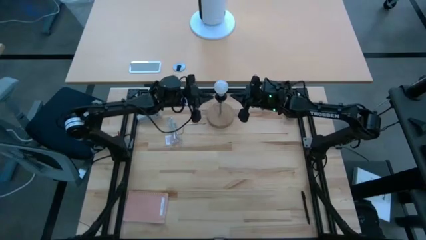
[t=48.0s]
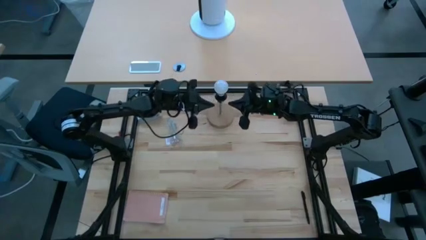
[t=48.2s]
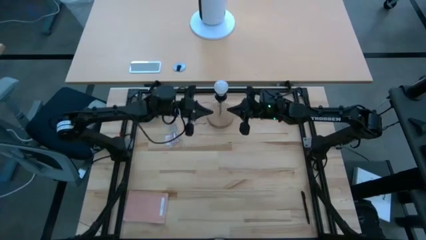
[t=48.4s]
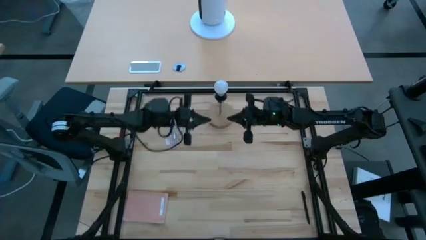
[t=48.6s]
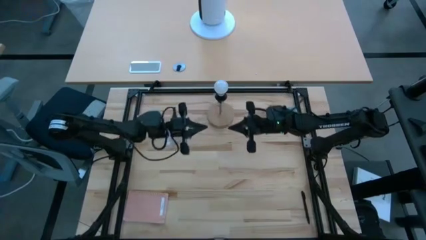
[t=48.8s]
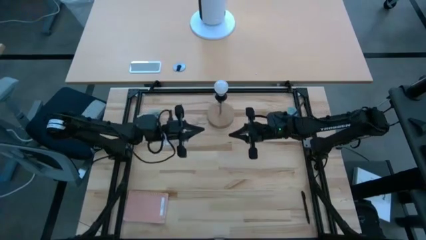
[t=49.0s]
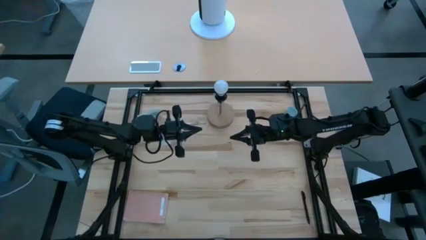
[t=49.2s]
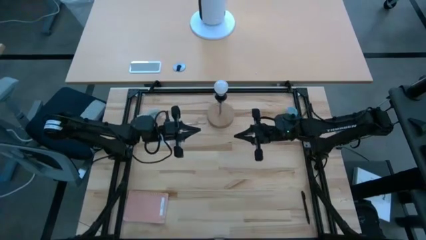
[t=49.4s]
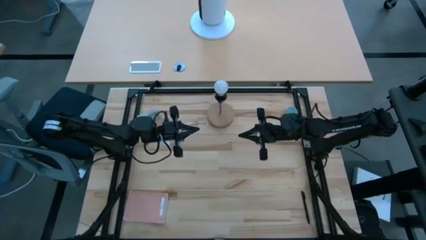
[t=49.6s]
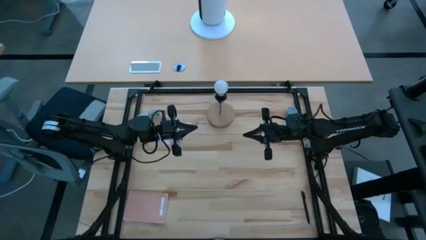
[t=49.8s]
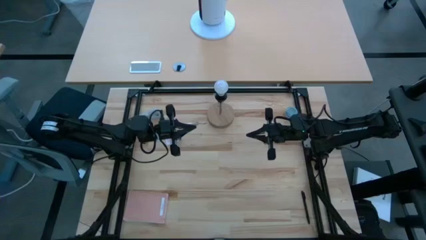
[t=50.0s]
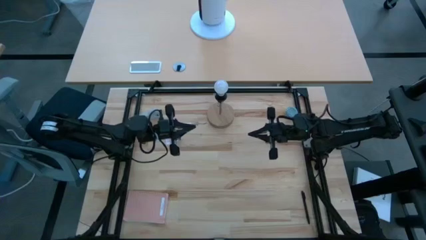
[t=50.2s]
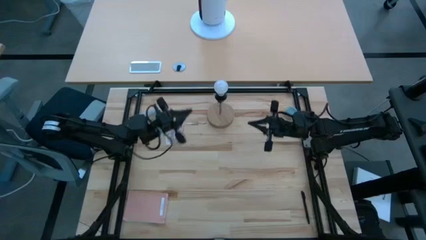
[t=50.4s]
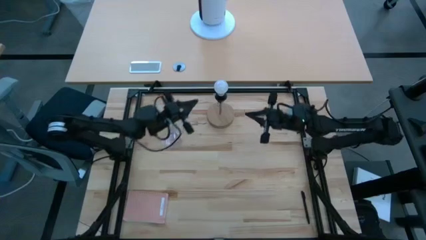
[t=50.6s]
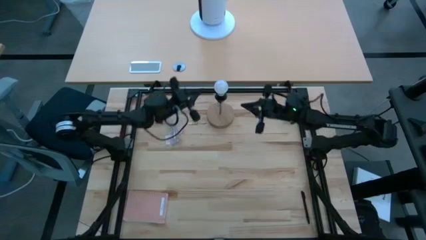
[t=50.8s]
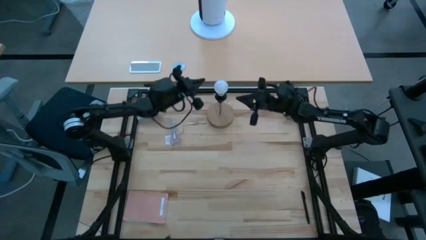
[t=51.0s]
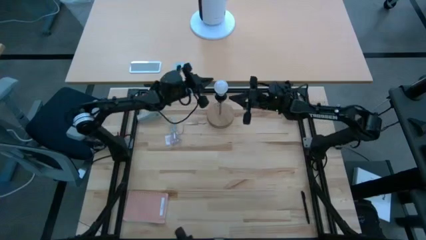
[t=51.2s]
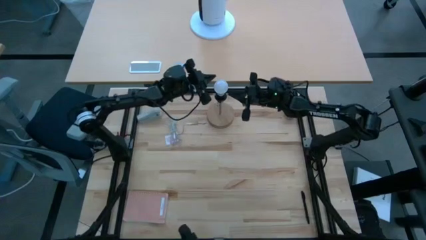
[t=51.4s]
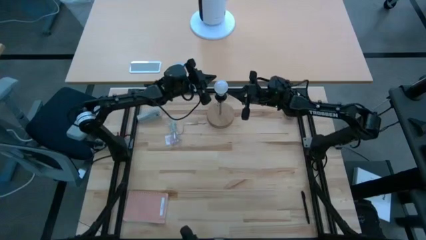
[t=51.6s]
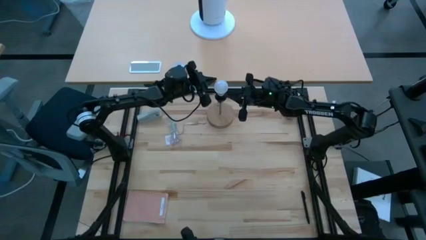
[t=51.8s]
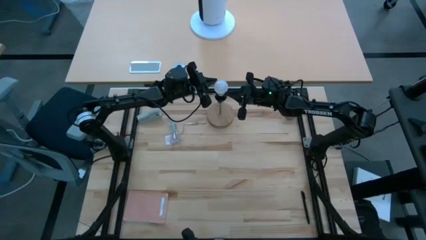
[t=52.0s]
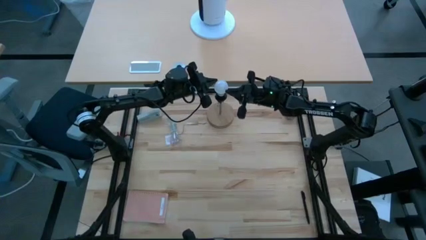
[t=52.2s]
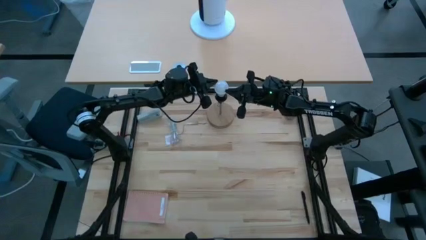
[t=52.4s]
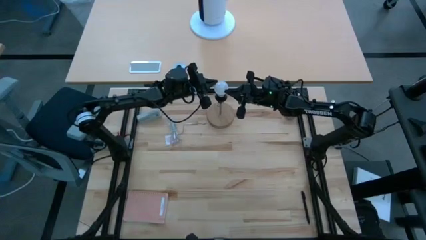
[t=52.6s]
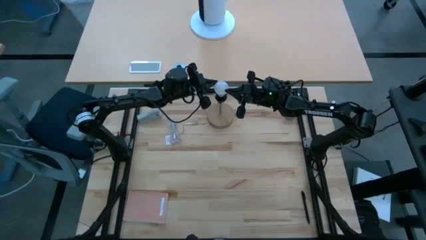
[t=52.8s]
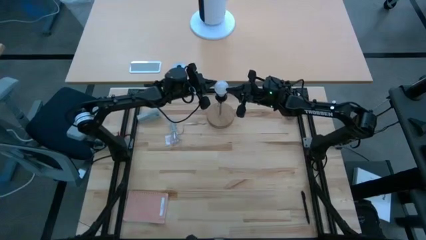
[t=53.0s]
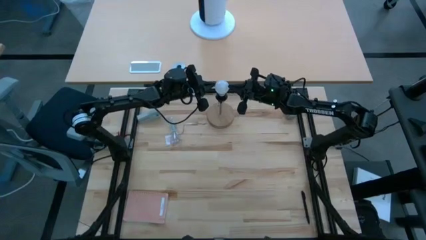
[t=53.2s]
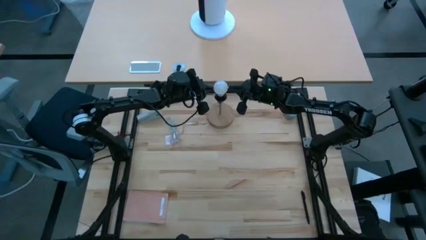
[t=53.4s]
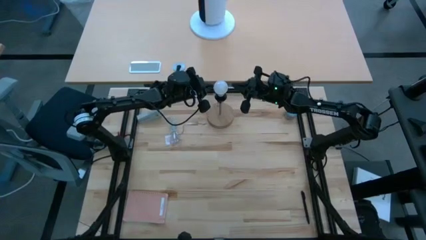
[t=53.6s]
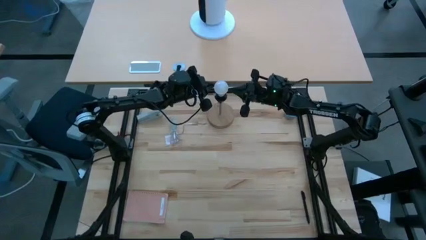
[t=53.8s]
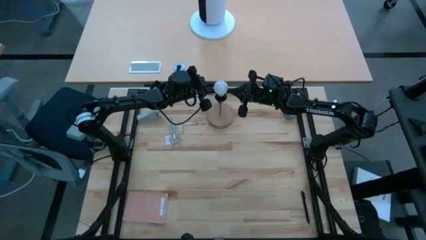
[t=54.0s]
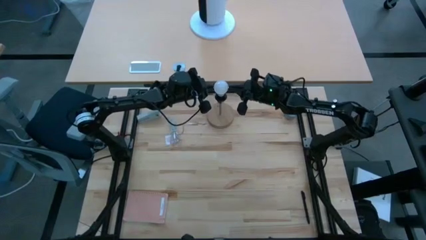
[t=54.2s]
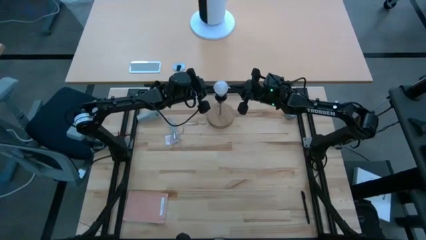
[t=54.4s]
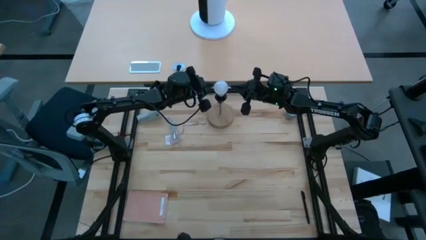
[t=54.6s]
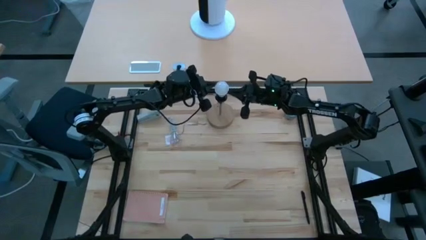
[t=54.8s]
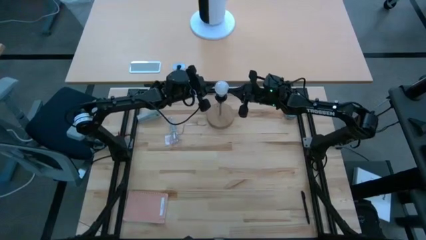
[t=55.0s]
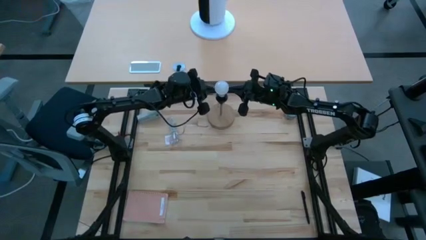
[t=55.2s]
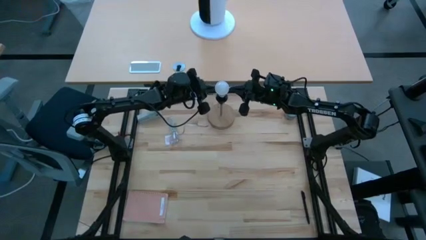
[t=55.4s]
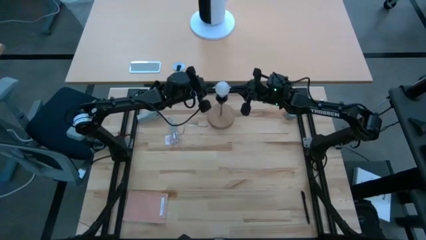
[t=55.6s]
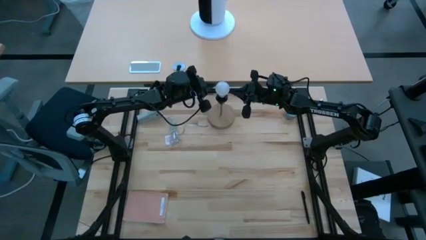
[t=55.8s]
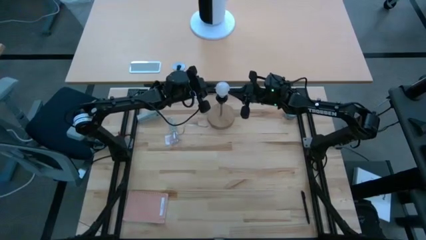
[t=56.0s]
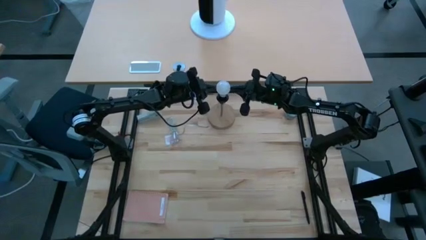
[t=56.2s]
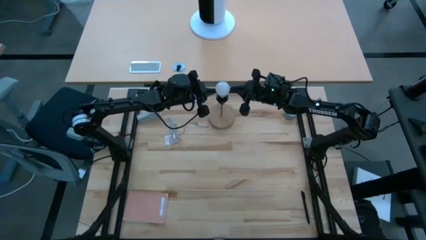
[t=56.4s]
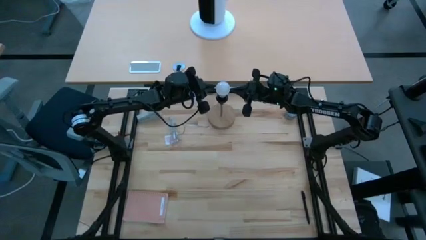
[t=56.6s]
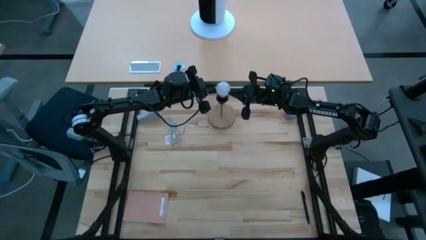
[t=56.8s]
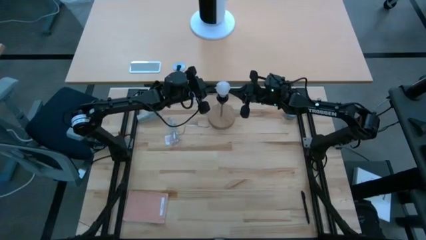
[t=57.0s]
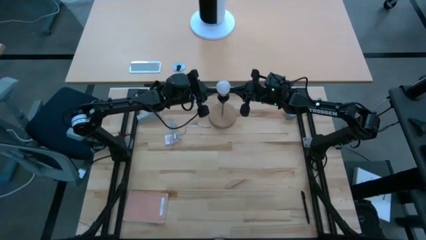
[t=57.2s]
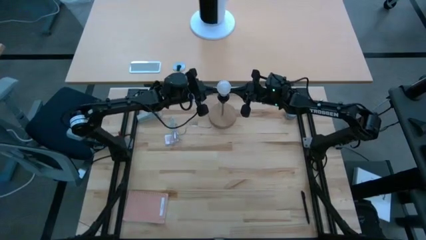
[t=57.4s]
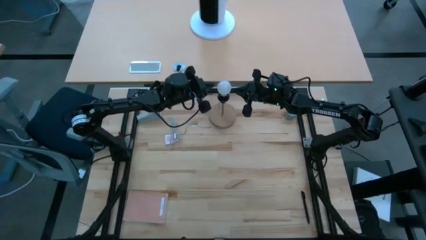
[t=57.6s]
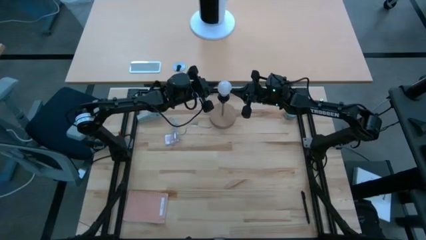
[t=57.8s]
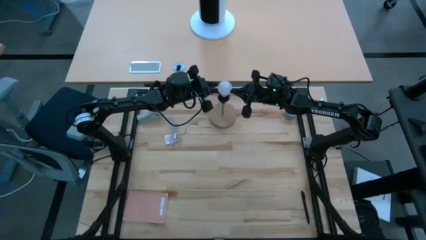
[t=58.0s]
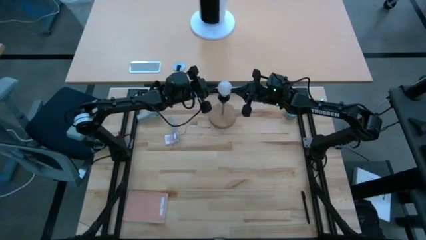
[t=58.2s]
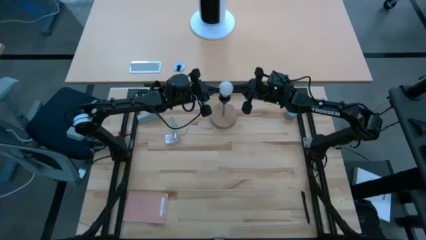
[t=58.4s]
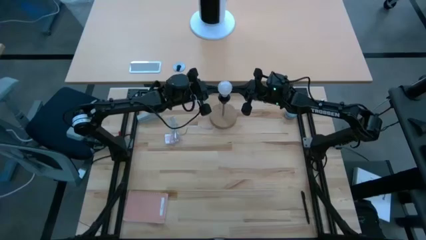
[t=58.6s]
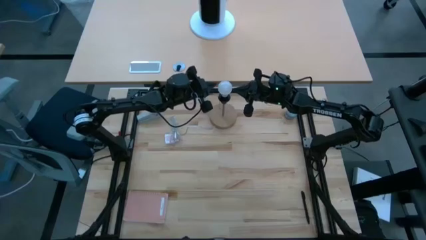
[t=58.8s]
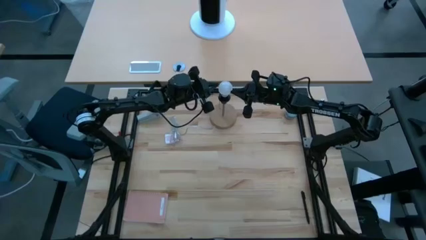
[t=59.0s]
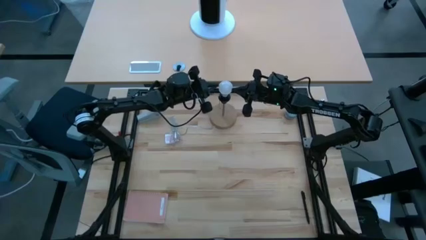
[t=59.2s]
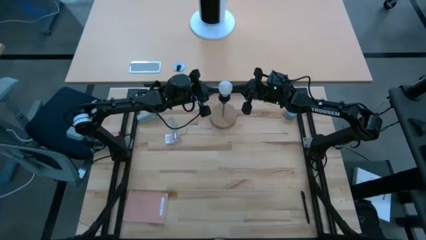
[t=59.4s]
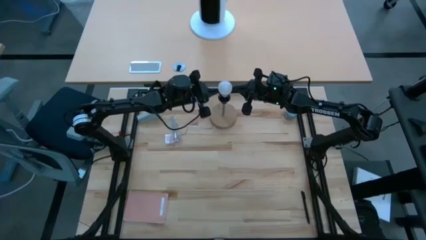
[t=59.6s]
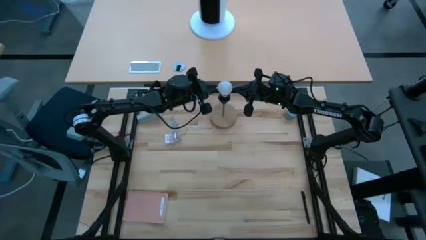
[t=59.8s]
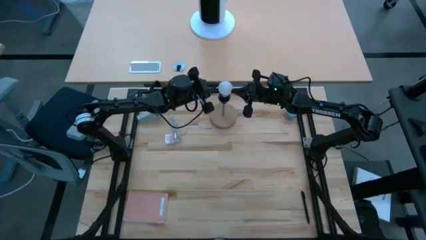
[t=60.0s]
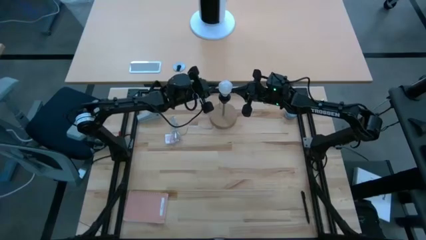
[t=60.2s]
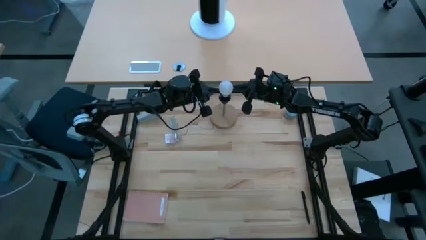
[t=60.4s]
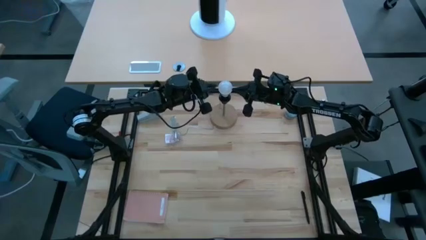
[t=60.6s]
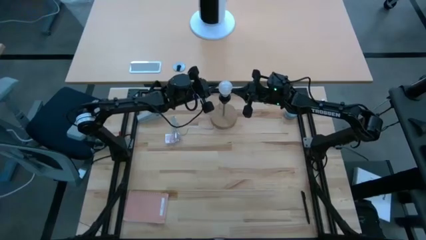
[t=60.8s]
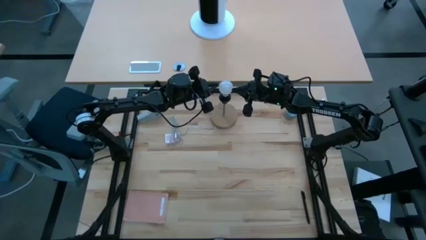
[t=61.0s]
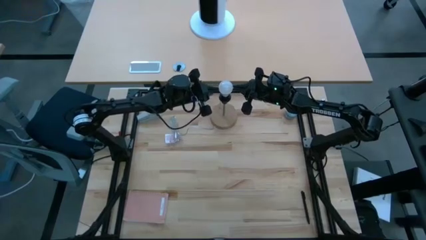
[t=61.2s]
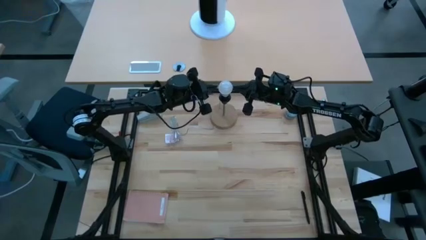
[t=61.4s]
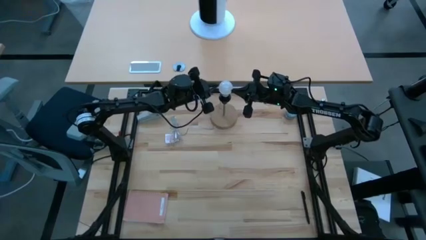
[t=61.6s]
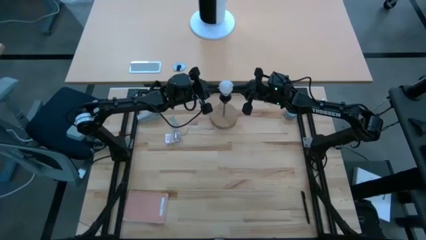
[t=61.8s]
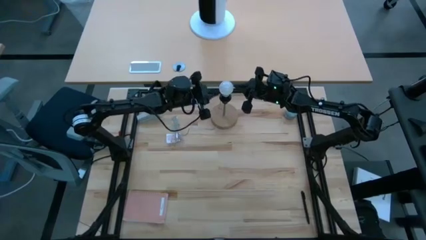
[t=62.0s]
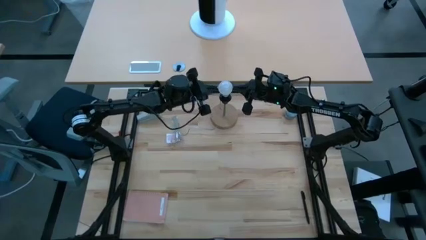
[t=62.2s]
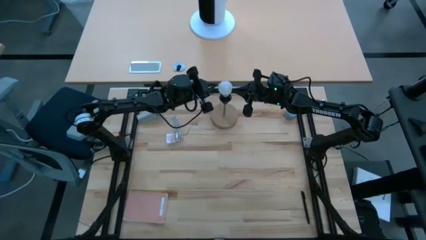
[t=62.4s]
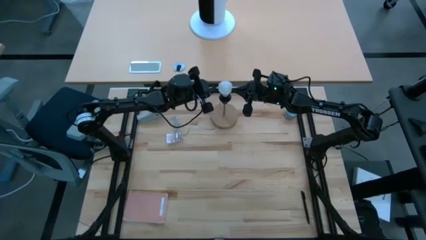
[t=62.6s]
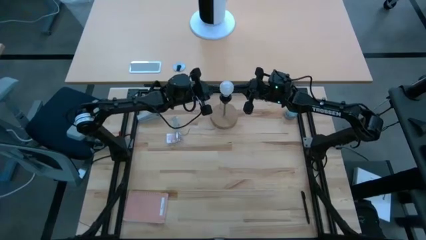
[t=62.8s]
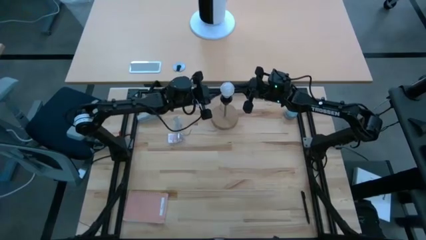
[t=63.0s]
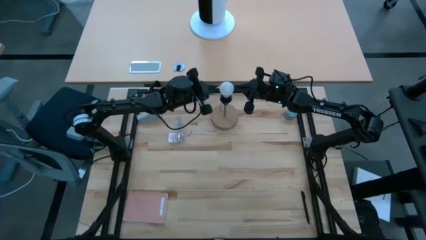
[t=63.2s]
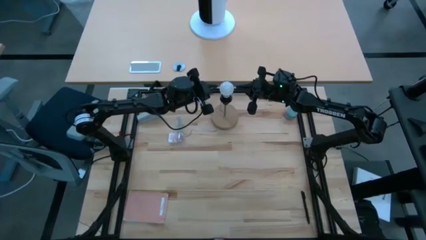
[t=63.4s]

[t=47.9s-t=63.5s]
Task: Screw lightbulb
Remove the lightbulb from the desk lamp
